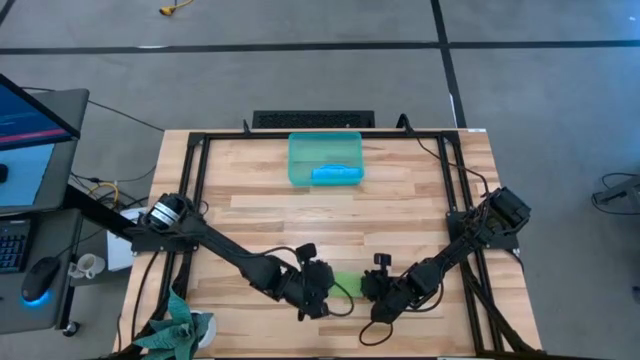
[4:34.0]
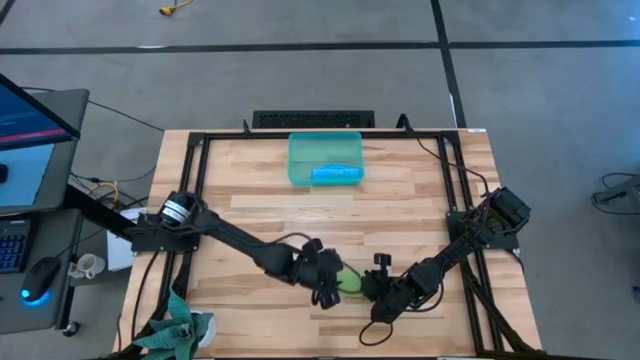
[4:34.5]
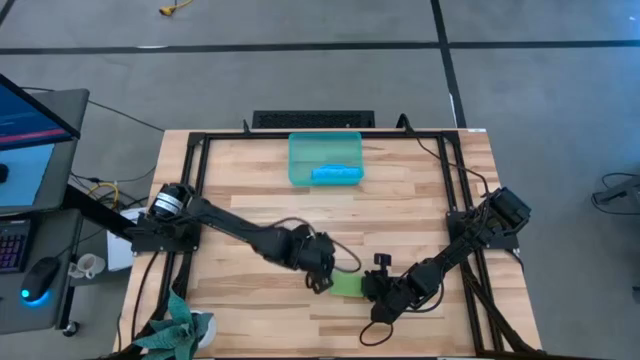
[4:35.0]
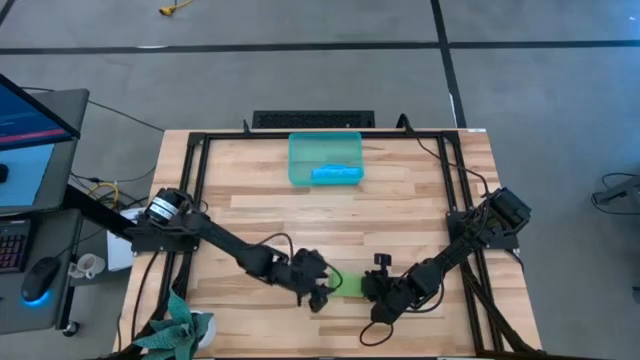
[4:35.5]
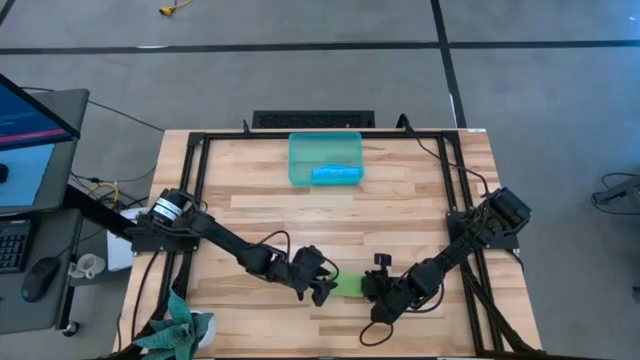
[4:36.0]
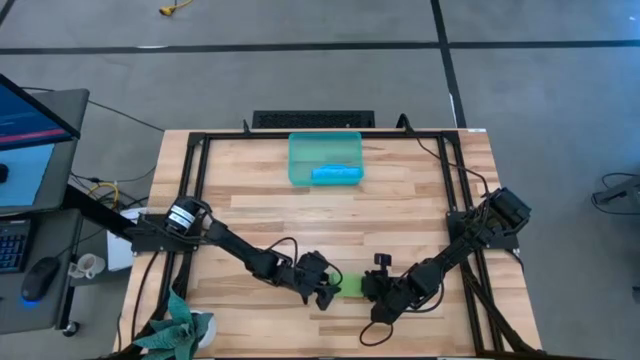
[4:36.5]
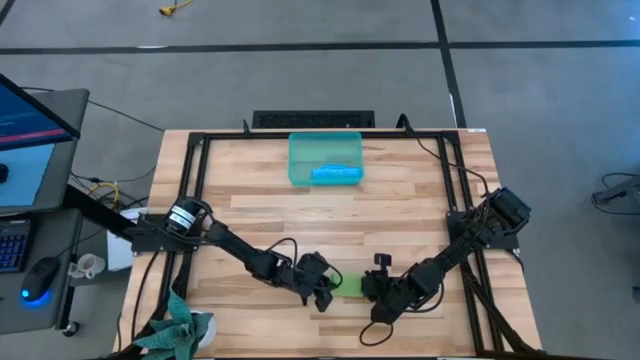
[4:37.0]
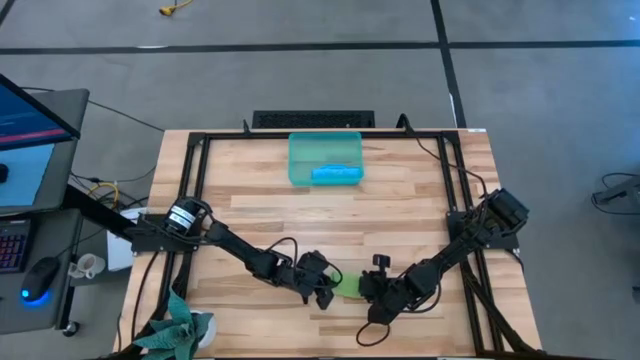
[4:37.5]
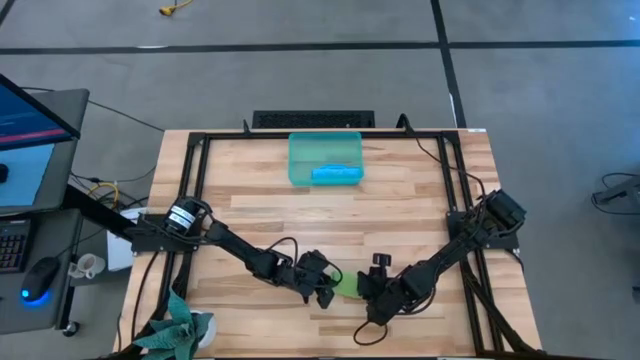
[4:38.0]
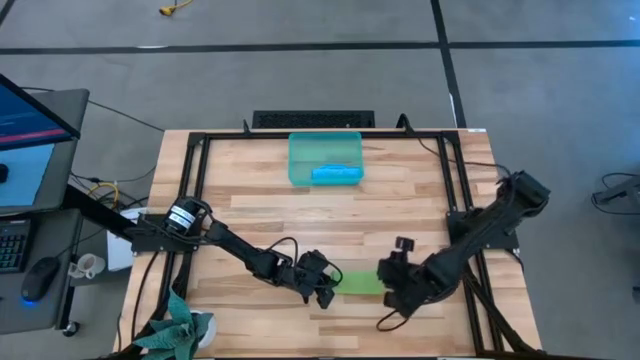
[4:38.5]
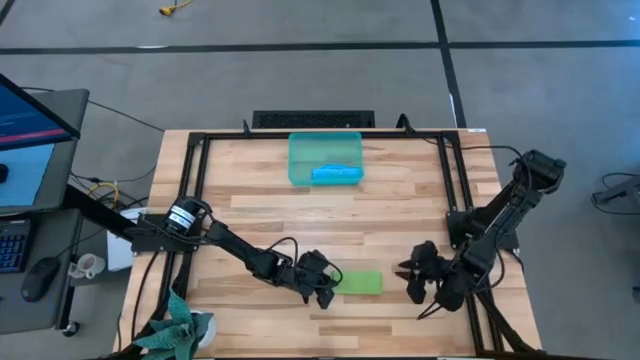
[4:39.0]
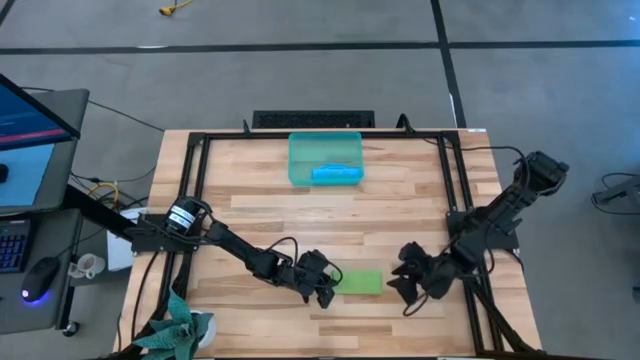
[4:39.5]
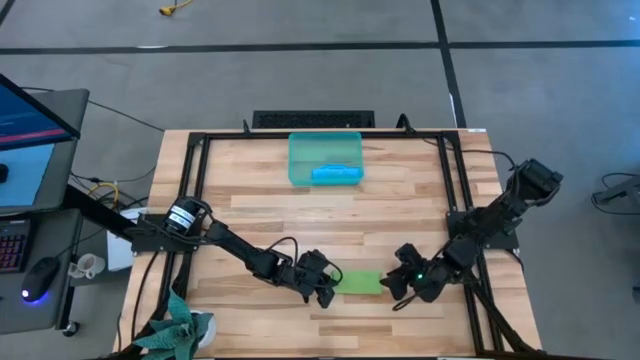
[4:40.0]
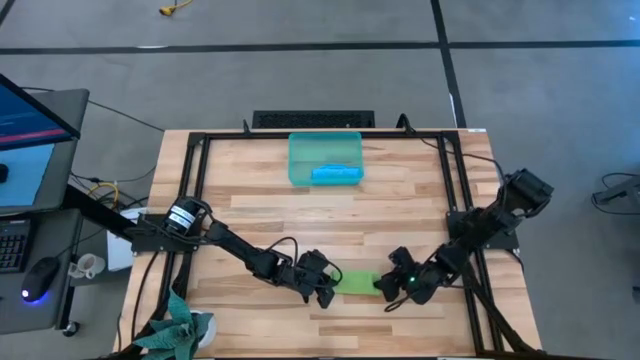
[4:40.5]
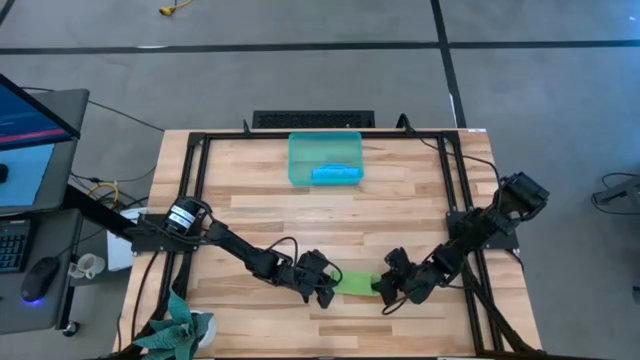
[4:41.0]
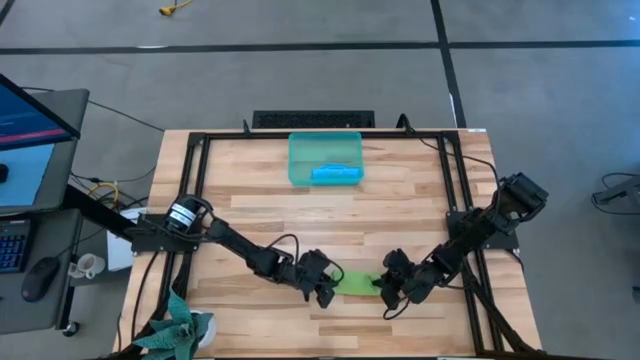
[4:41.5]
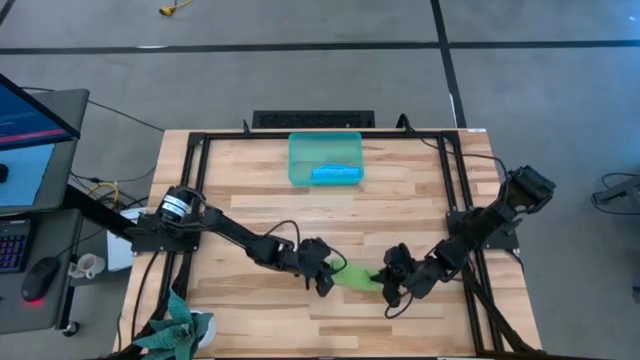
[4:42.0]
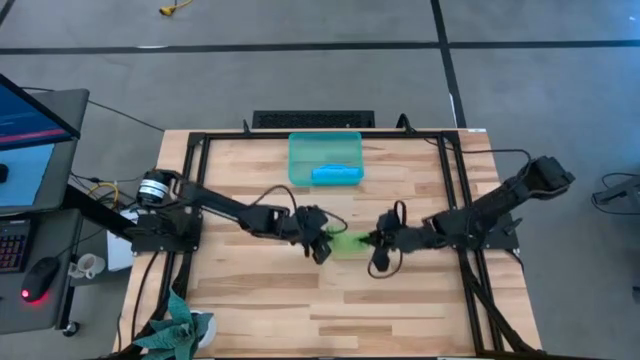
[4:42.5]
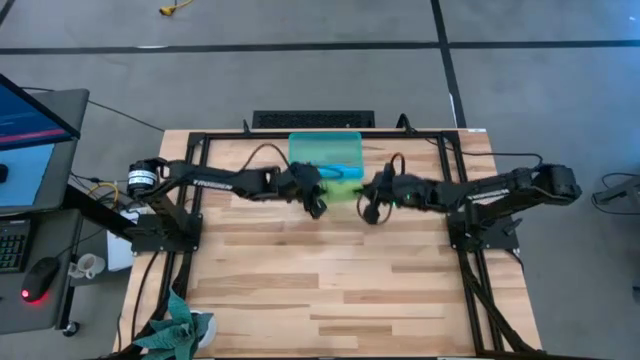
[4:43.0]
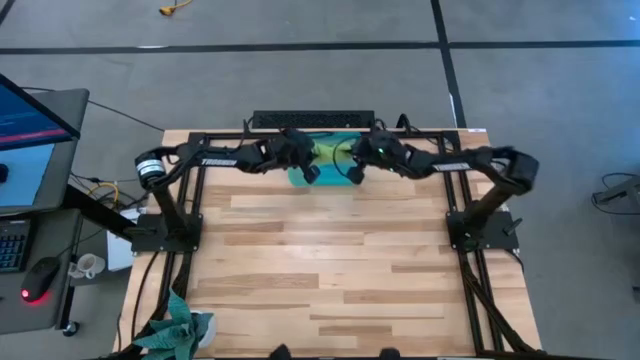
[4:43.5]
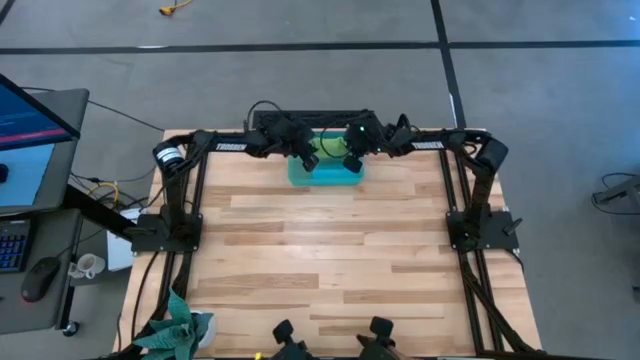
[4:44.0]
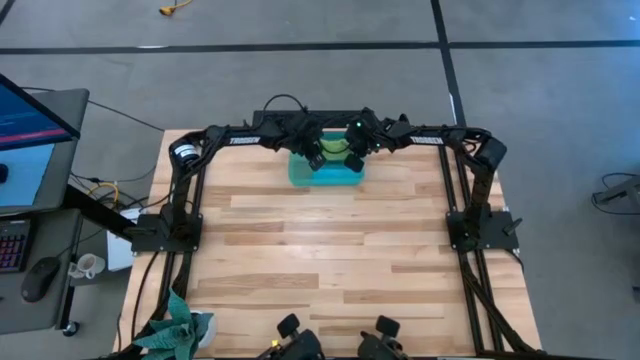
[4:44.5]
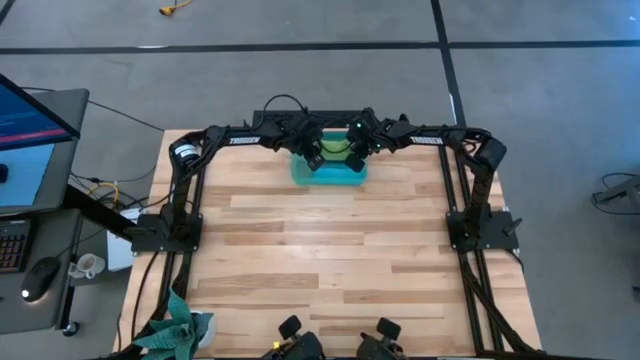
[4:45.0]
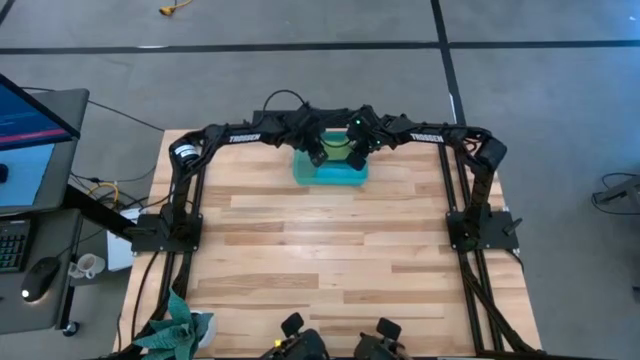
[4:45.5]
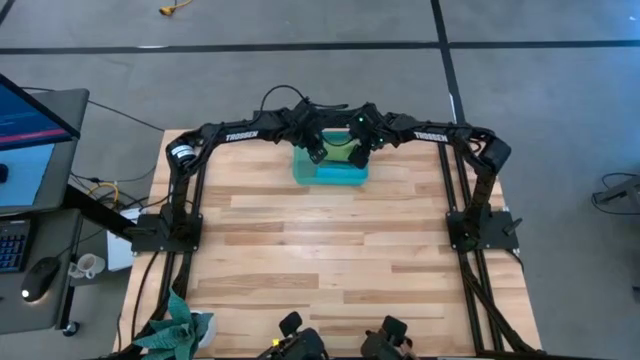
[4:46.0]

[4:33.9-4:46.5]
Task: Roll microfiber towels into tight, uniform cylinder then place into a basket
Put the green microfiber cloth into the blue bin

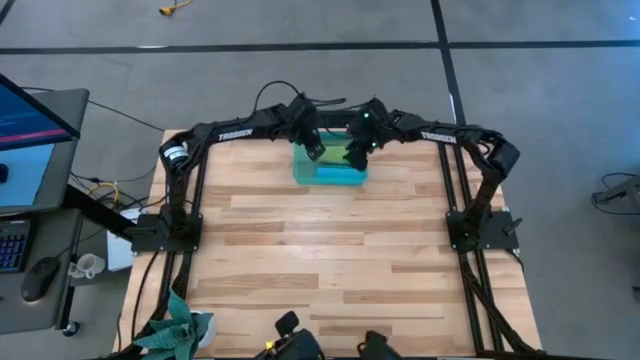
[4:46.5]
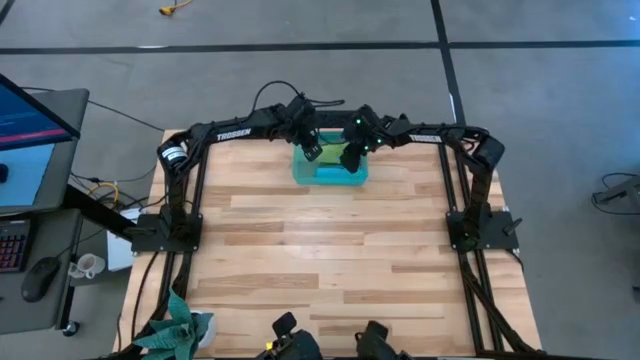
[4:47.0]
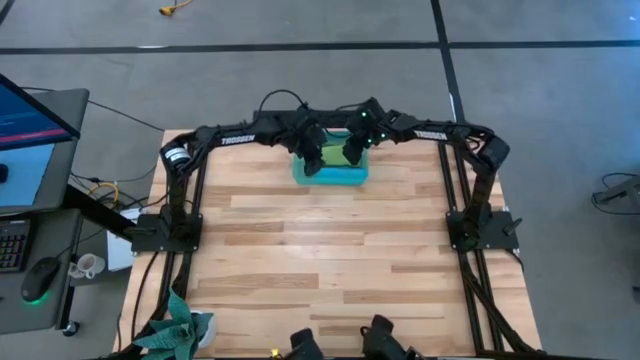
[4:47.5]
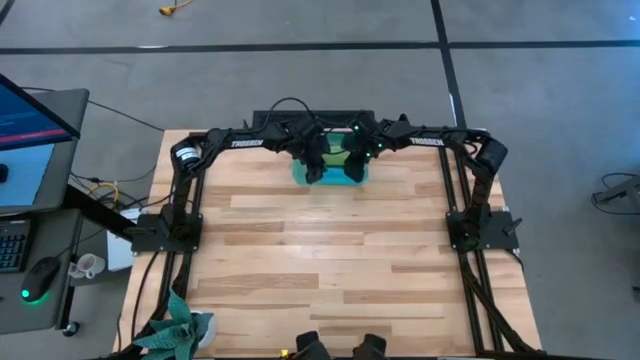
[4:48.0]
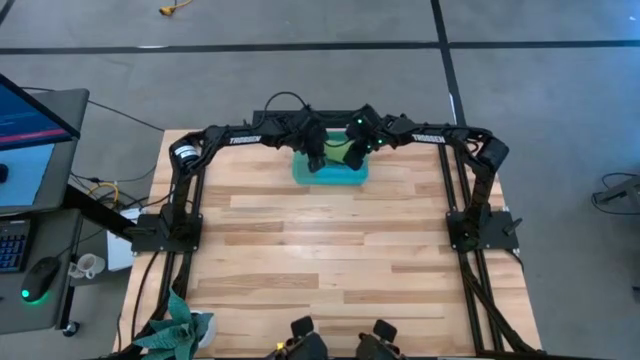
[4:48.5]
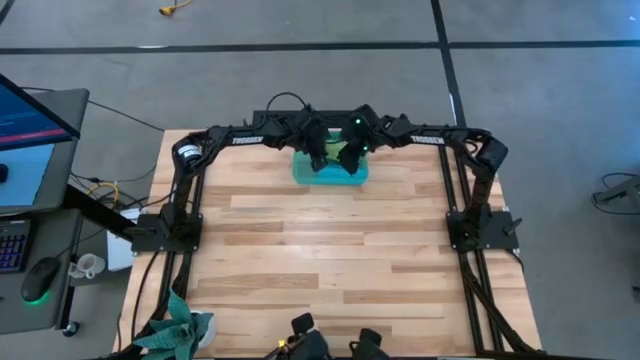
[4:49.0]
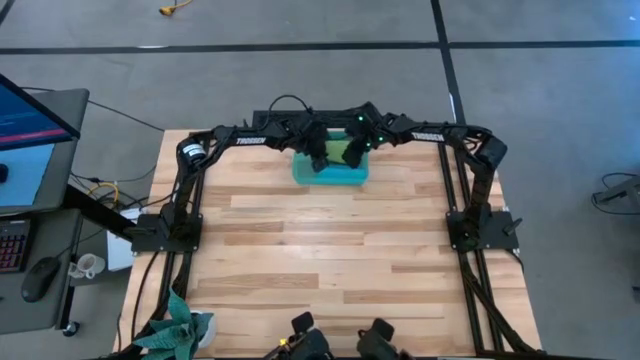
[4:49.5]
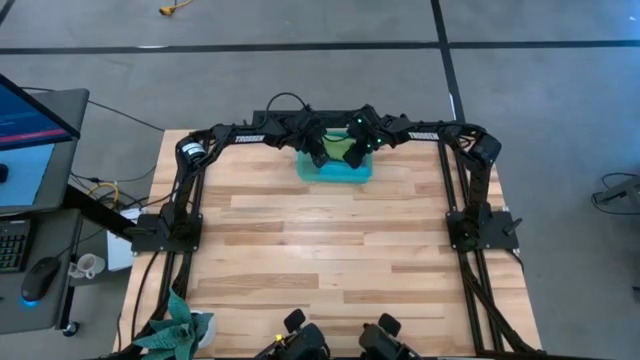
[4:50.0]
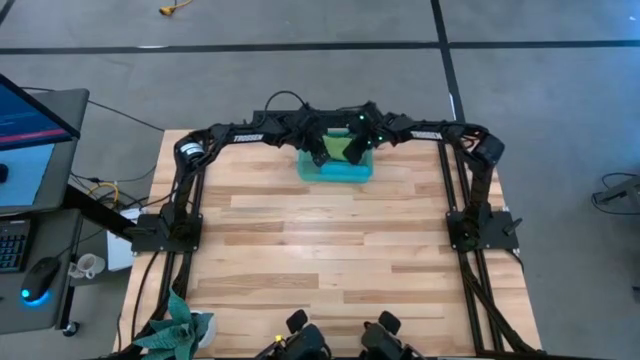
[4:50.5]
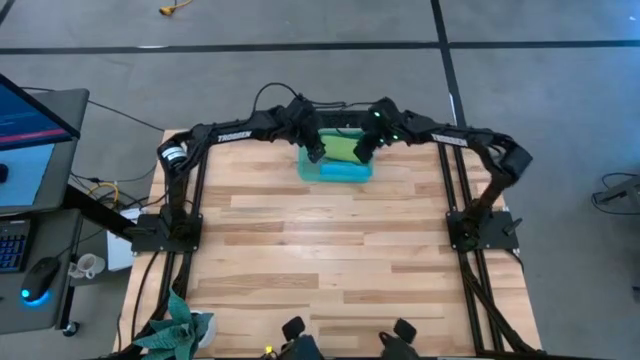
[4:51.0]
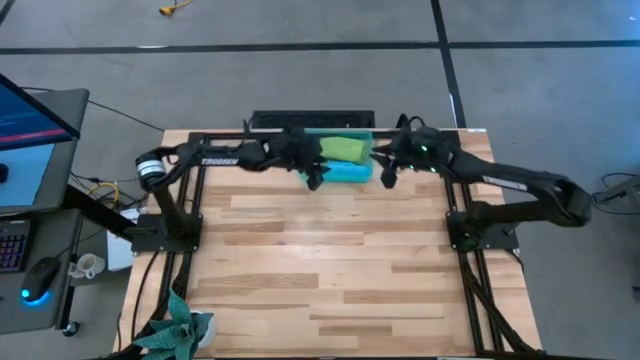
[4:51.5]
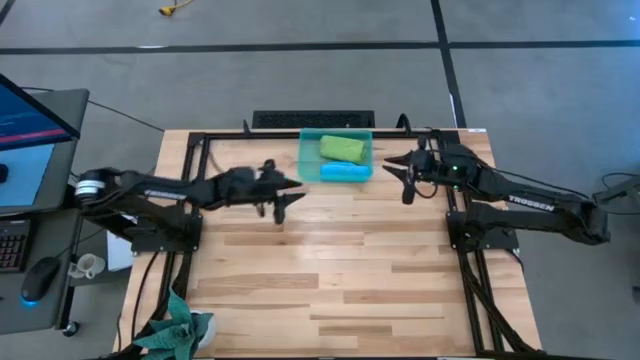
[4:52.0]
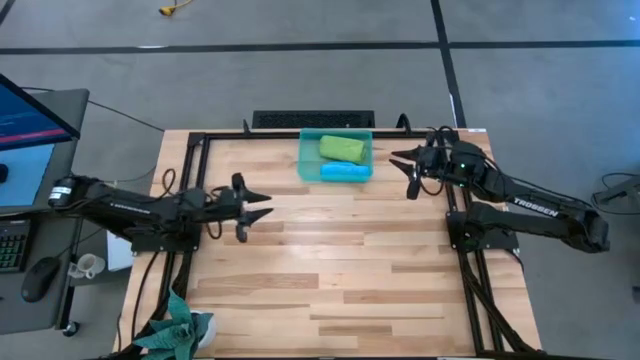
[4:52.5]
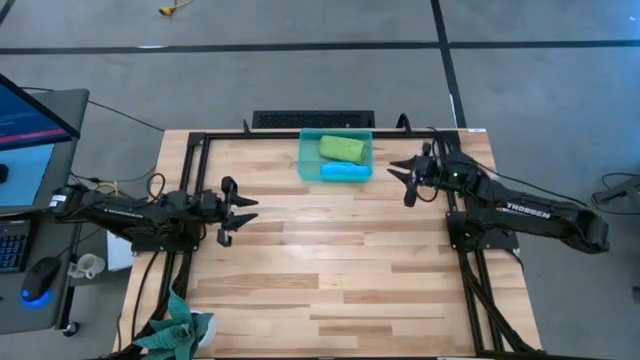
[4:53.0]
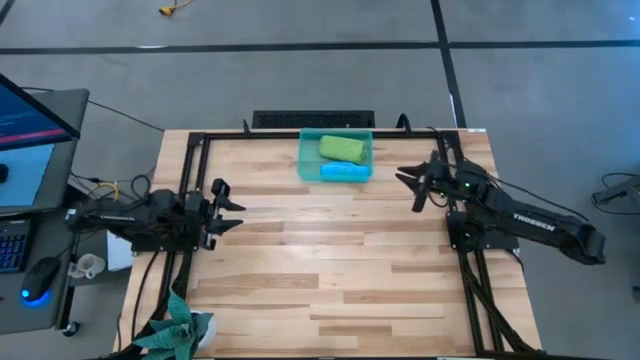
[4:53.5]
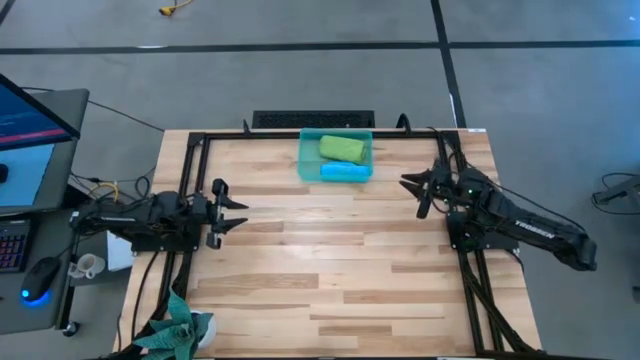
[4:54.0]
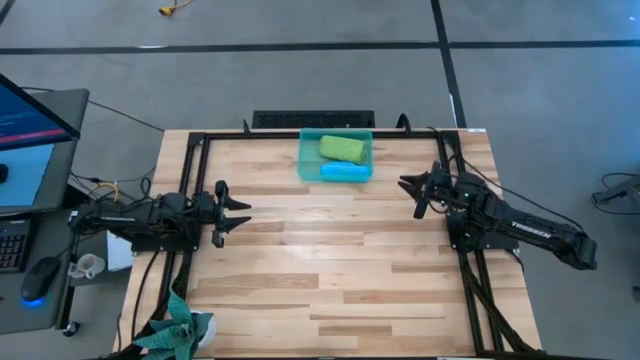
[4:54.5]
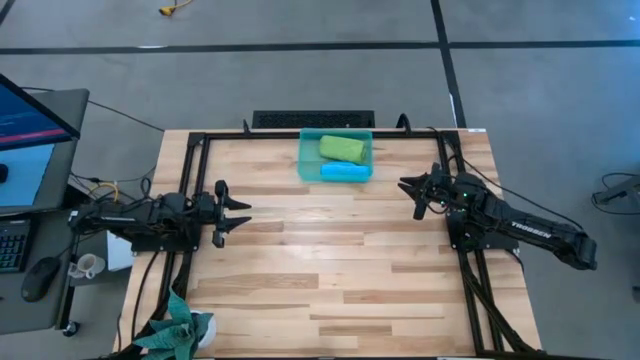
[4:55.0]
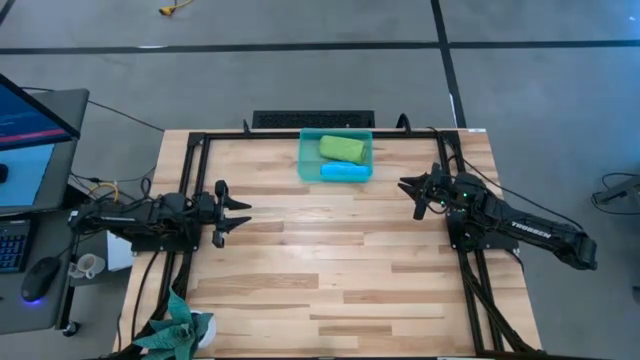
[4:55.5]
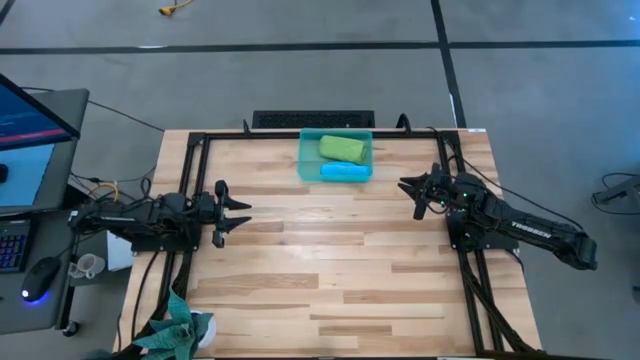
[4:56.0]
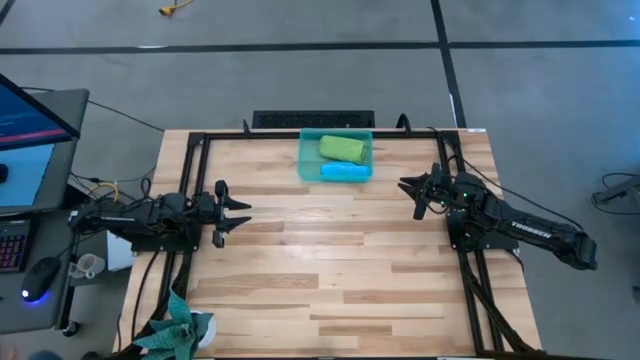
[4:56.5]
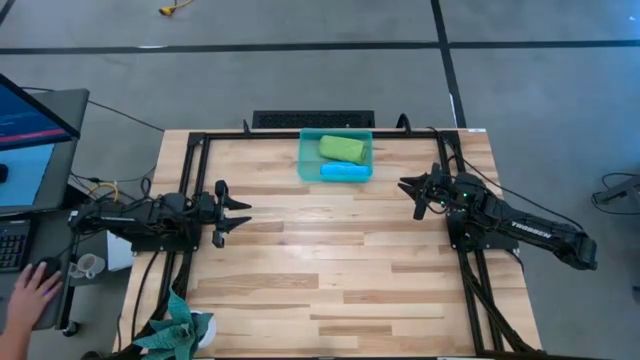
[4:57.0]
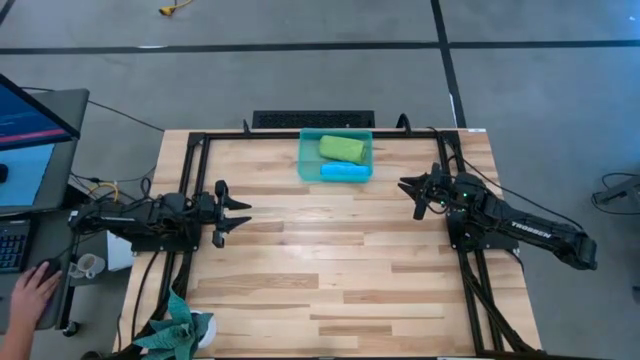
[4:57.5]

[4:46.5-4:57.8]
Return to Home Position
